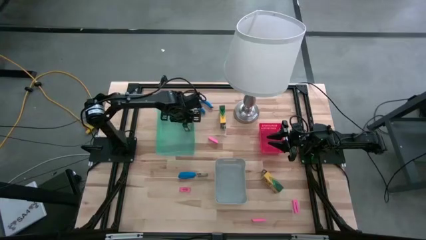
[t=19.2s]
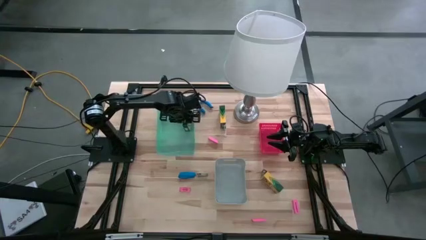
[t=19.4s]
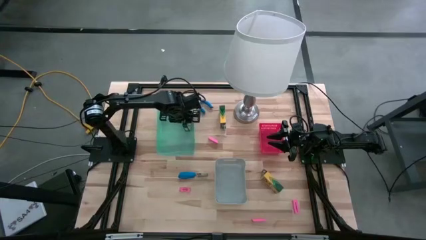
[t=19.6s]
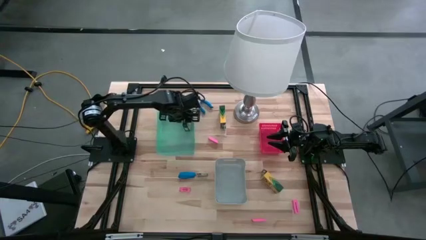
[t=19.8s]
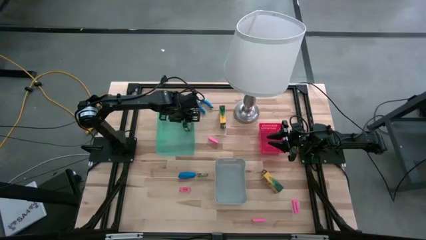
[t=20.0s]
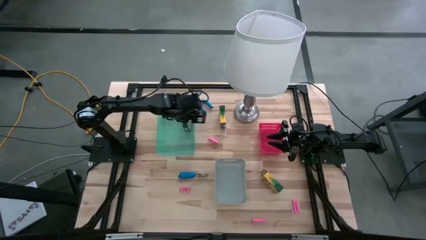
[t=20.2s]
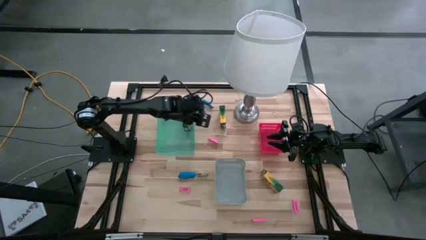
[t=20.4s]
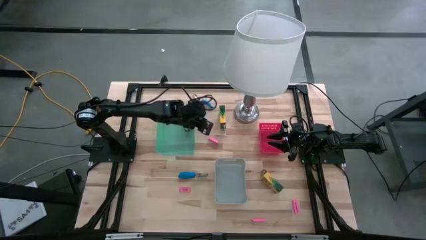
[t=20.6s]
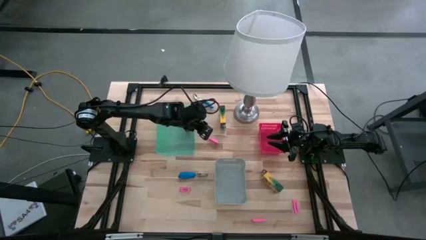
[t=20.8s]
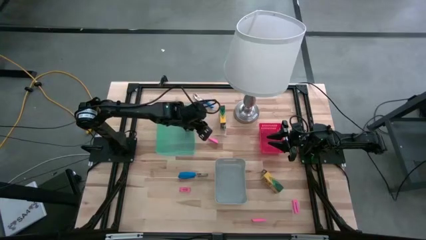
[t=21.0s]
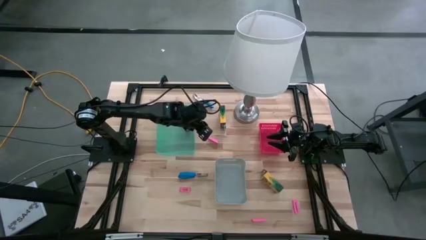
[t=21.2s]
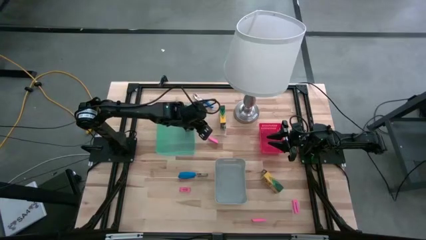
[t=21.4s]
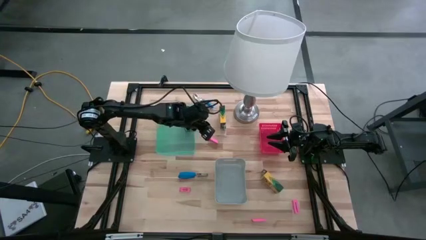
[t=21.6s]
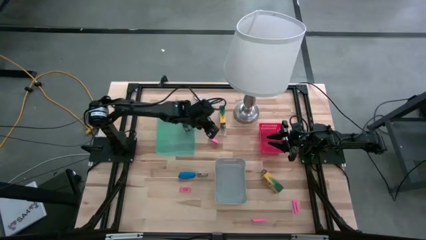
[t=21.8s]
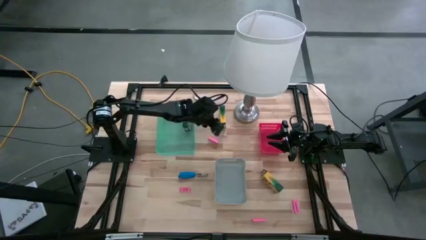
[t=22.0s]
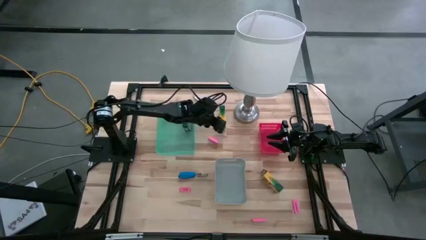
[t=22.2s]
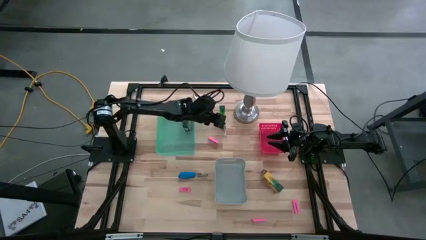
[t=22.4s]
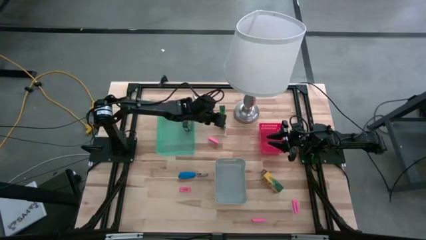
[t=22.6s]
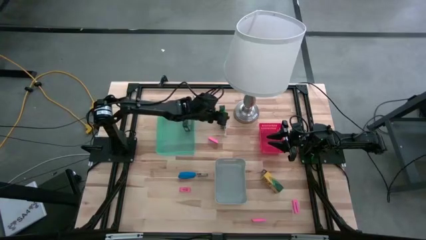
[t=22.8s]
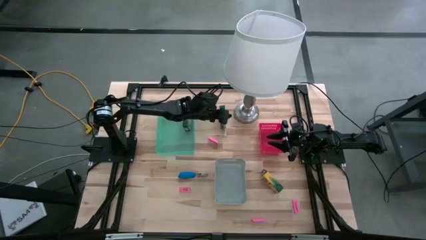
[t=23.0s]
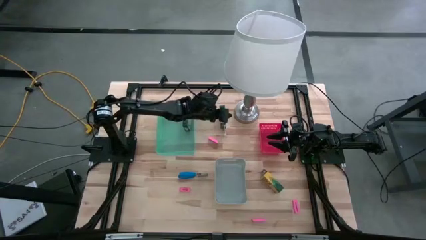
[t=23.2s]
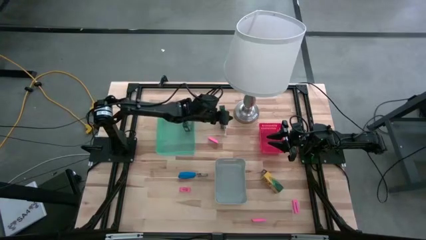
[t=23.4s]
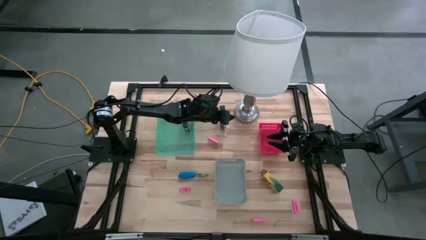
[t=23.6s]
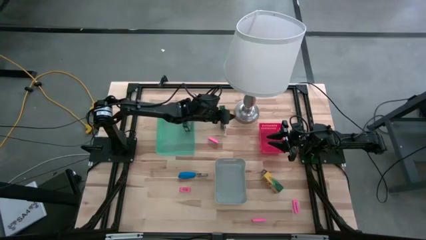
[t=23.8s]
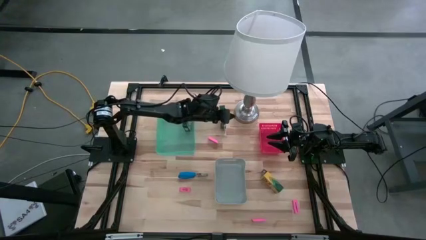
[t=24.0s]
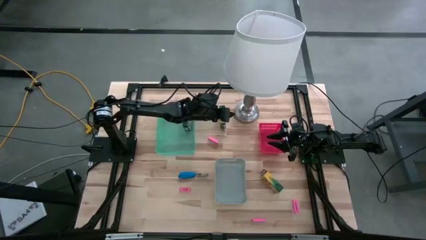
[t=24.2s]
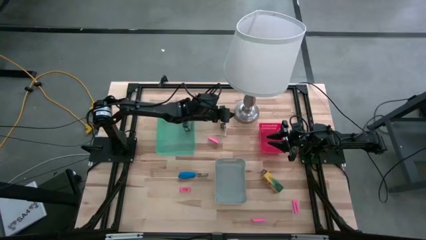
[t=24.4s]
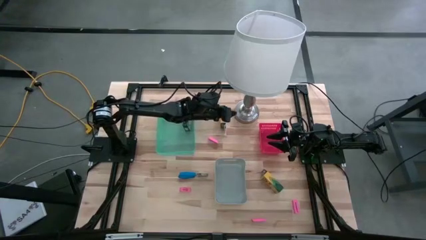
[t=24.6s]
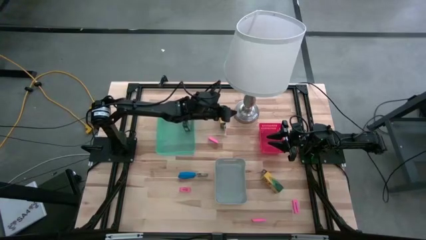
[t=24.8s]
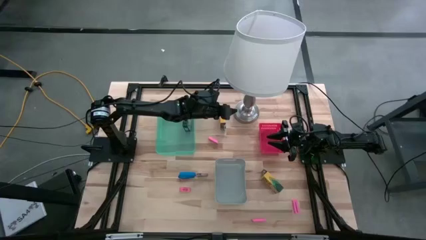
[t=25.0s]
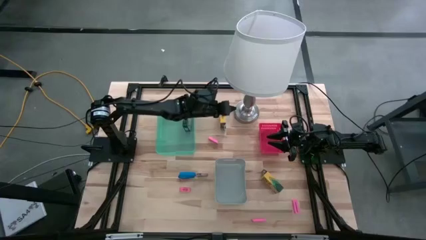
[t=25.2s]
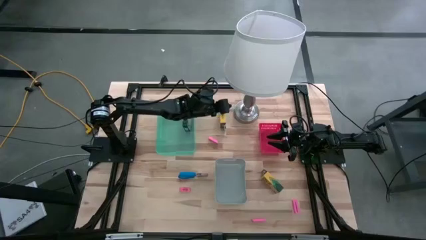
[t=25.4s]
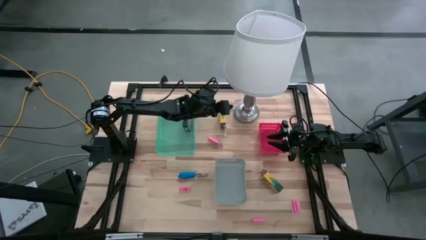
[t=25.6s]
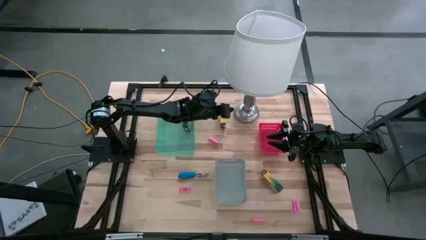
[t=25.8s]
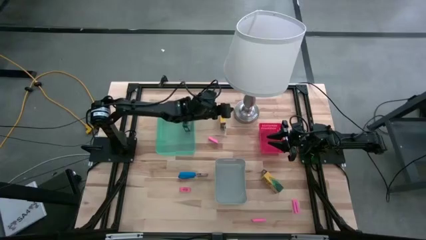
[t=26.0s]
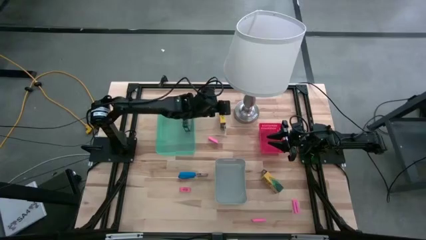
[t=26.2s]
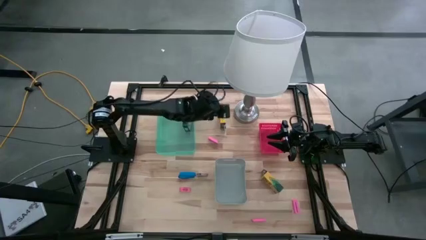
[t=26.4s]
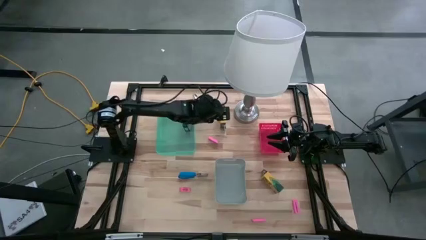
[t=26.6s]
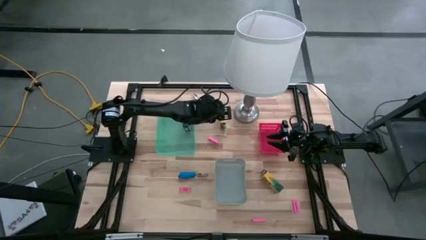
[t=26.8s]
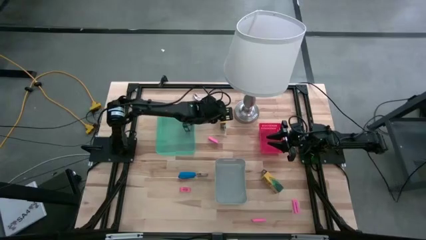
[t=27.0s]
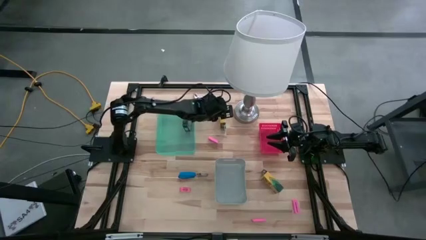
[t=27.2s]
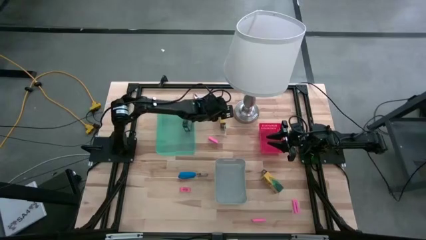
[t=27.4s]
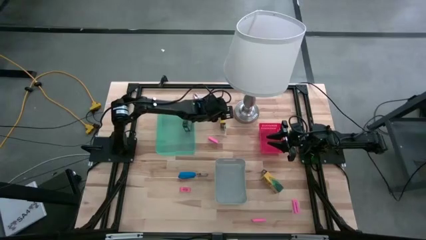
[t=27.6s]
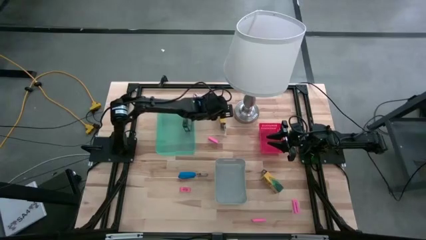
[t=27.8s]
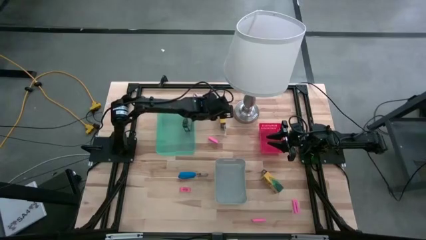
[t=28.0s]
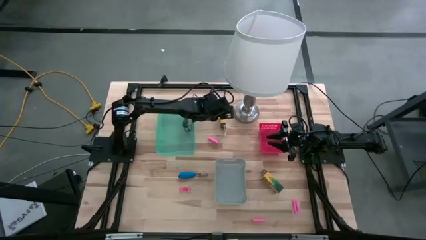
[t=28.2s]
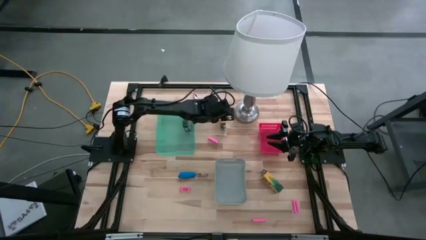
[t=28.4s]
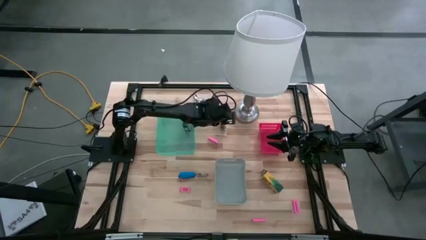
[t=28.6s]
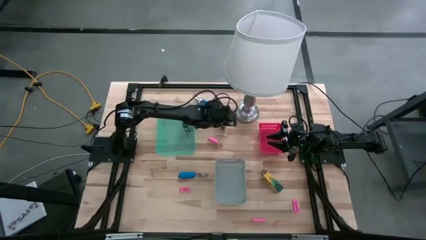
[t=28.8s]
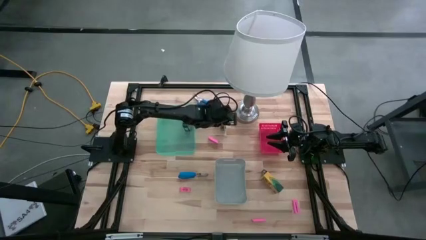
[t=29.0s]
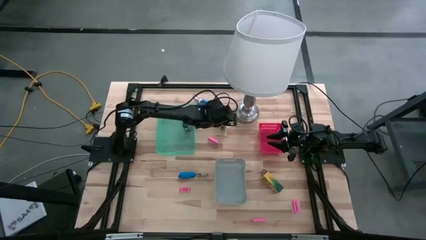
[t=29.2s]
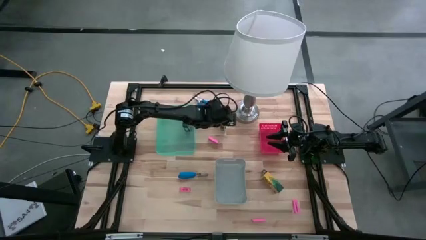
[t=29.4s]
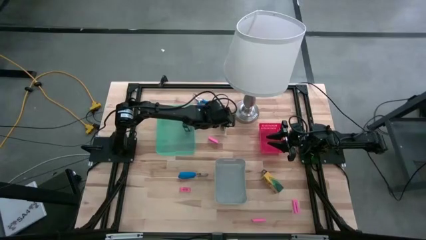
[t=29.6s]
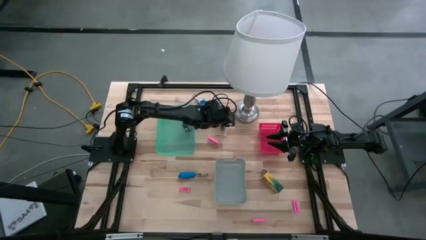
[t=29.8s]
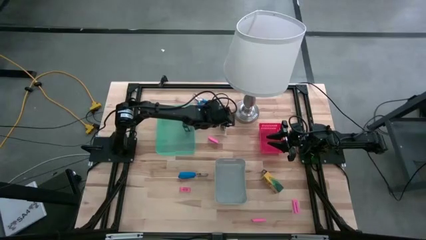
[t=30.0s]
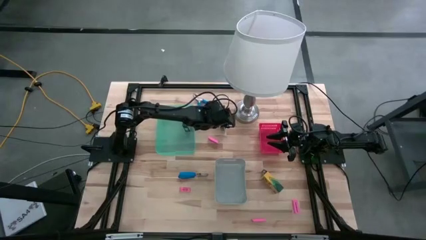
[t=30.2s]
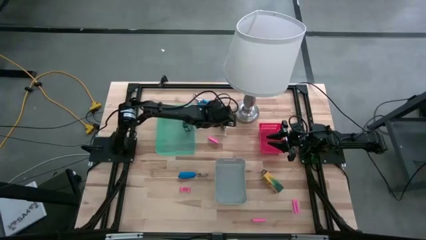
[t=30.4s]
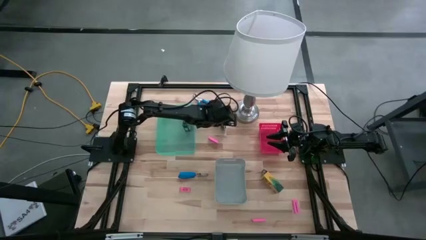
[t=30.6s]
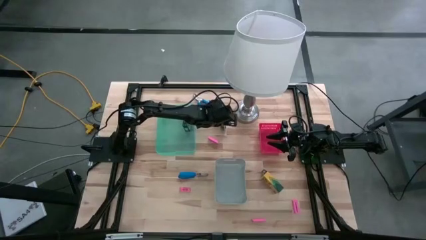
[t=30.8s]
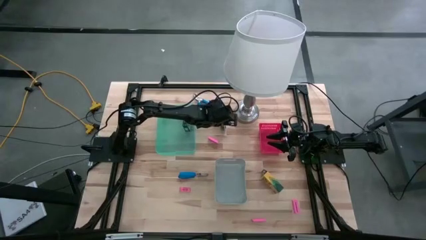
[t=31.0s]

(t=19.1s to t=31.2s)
Task: Pick & Place School Supplies
Put the crayon box into the green bin

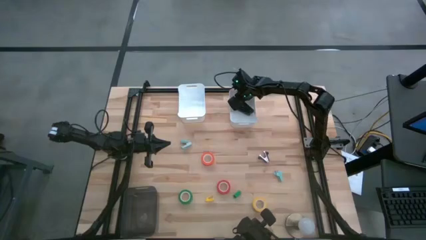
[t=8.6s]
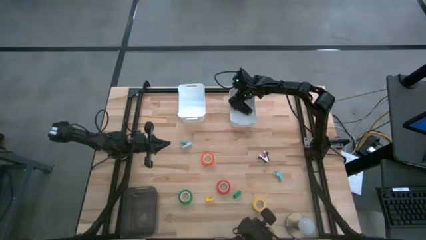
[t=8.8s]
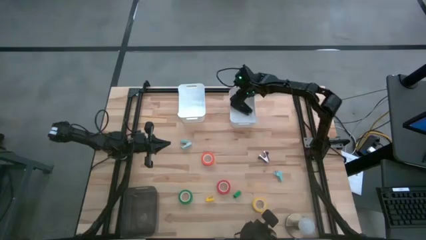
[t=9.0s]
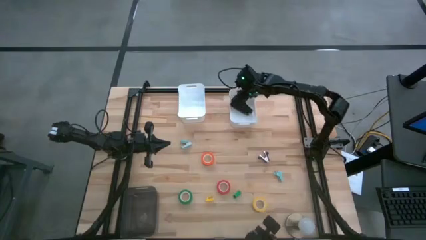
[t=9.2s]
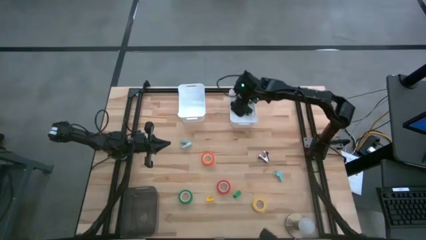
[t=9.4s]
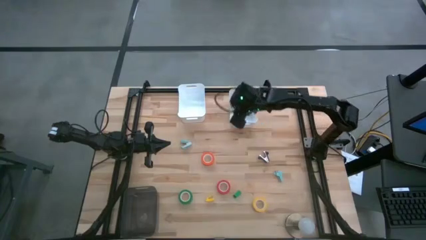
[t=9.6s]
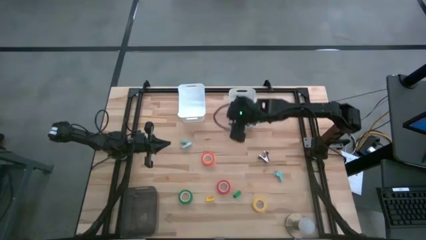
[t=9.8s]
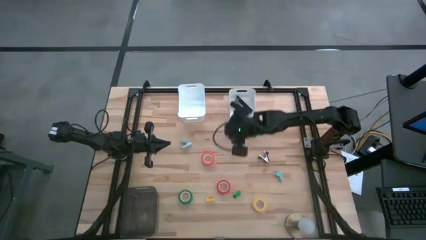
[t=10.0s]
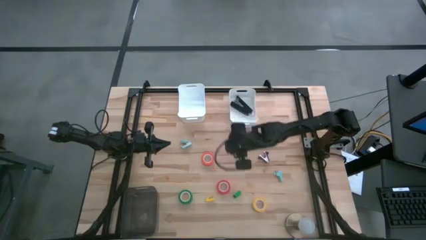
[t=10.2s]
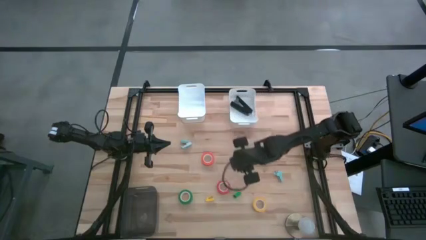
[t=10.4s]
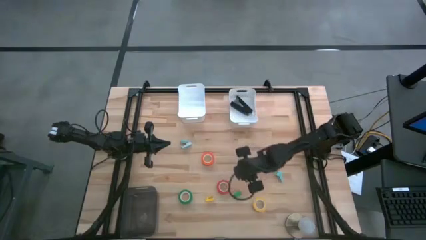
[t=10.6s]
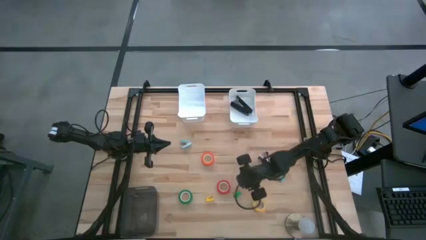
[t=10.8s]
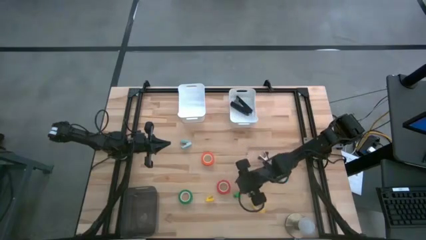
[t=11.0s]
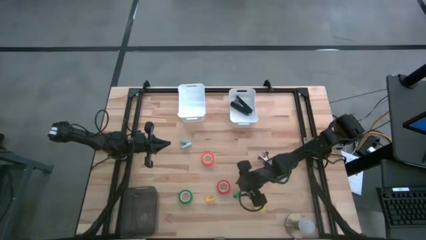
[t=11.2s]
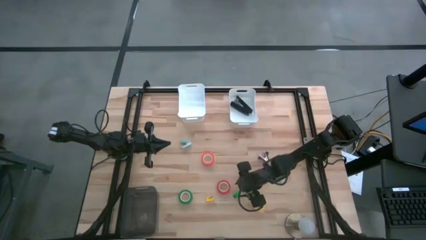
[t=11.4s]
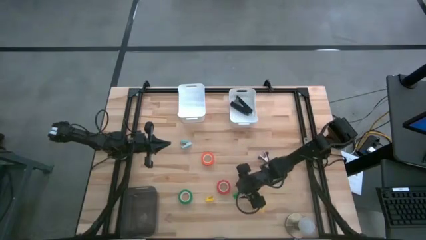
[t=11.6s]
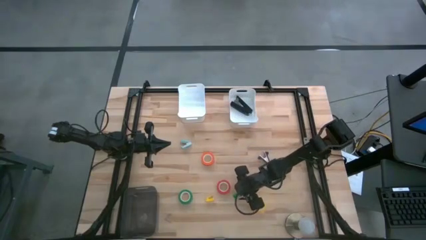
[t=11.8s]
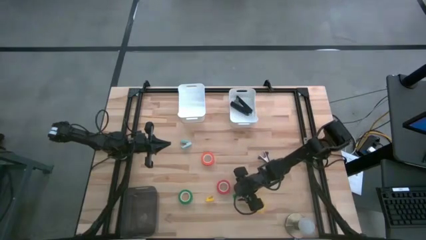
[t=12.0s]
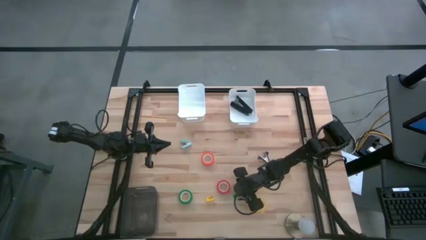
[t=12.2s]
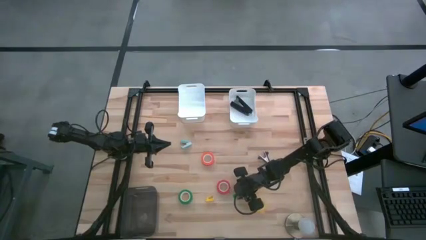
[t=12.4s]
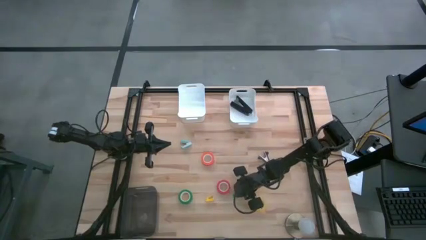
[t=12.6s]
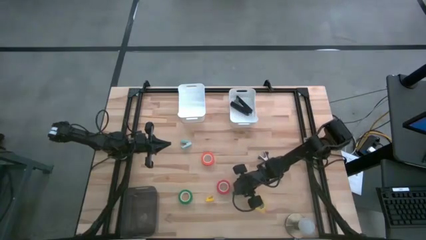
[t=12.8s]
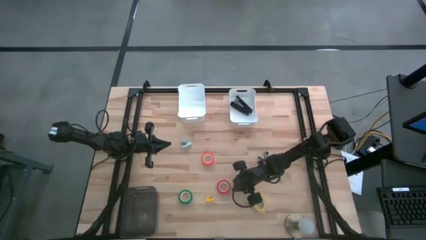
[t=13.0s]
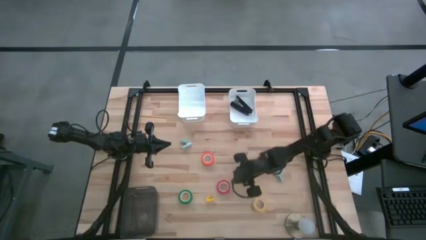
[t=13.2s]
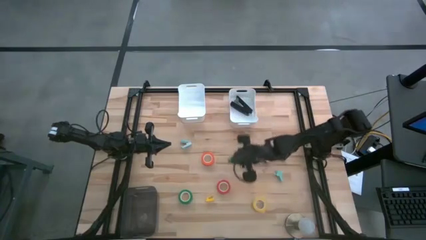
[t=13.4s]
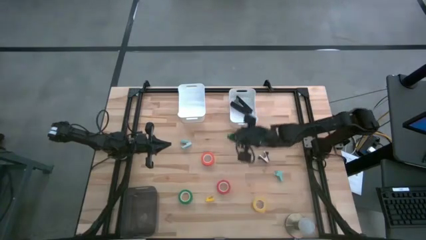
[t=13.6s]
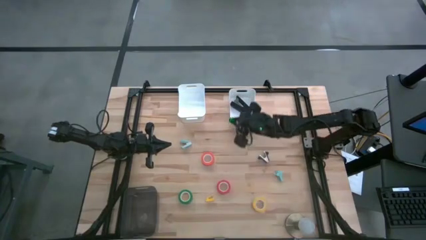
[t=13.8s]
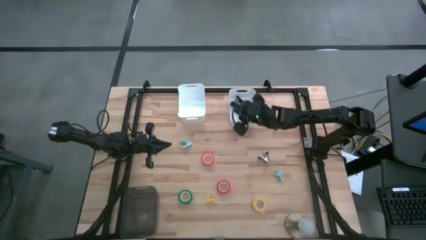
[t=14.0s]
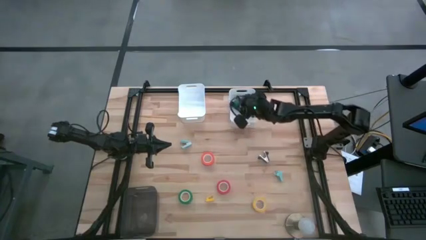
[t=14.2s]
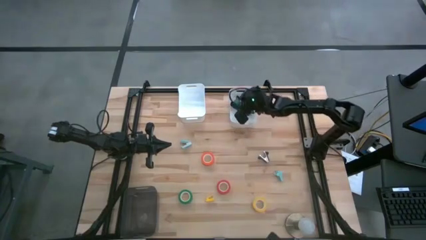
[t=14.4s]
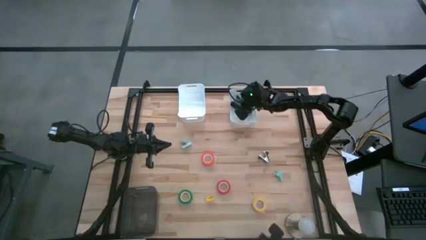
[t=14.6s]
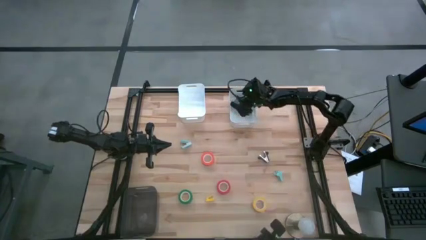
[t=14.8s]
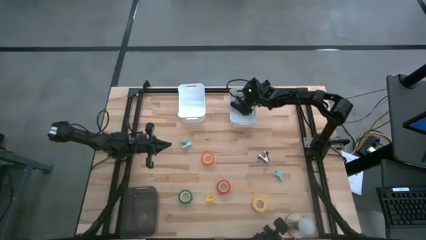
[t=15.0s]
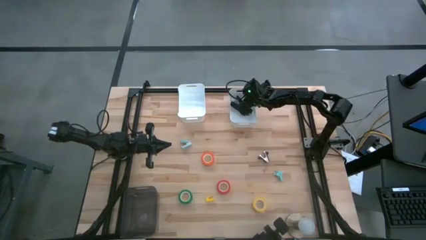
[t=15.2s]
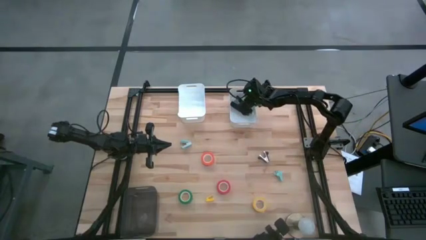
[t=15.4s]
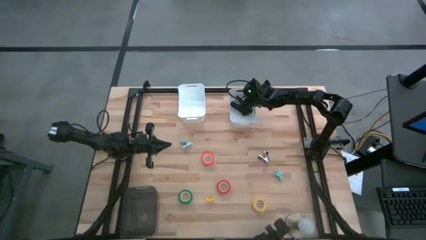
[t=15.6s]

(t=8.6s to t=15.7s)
Task: Pick and place Stapler, Stapler remover, tape
Put the green stapler into the right white bin
